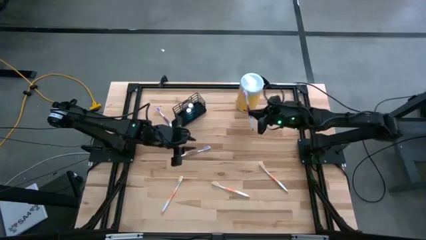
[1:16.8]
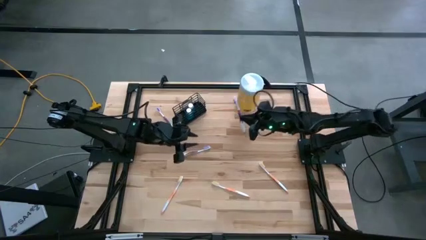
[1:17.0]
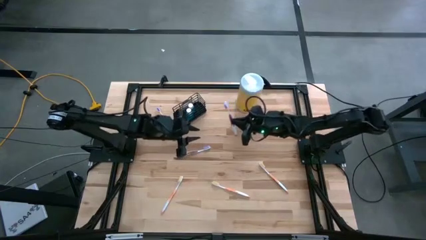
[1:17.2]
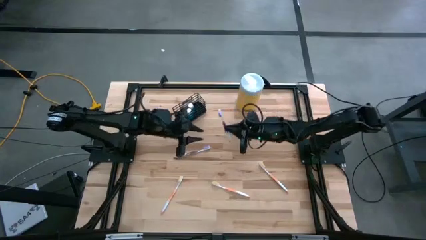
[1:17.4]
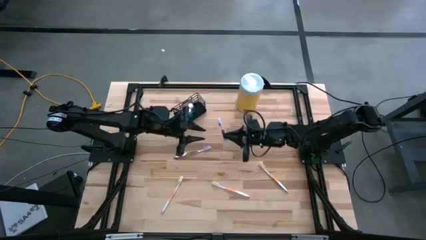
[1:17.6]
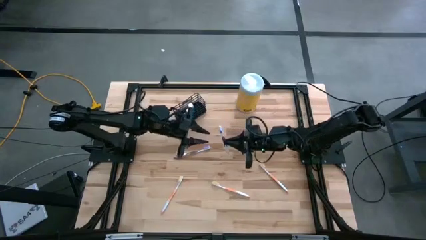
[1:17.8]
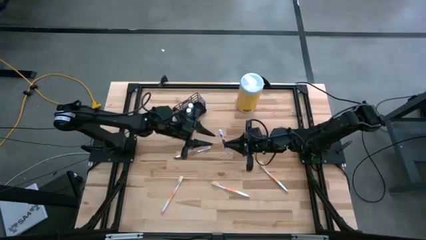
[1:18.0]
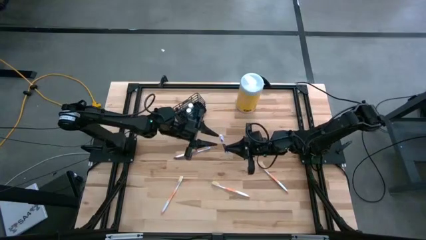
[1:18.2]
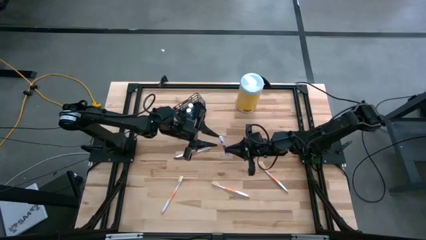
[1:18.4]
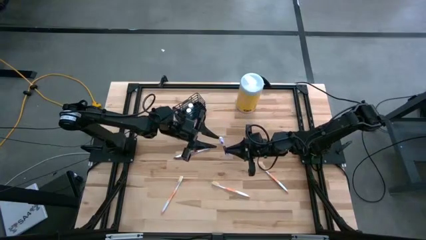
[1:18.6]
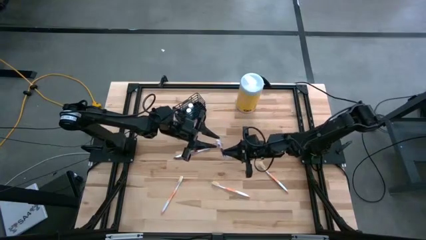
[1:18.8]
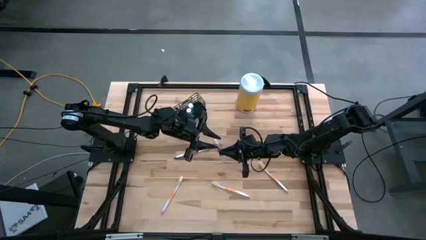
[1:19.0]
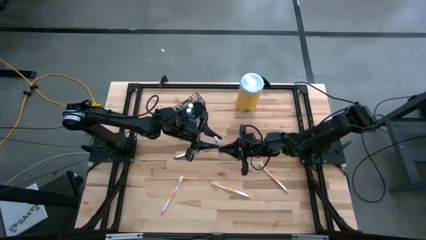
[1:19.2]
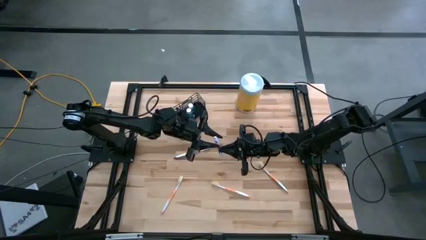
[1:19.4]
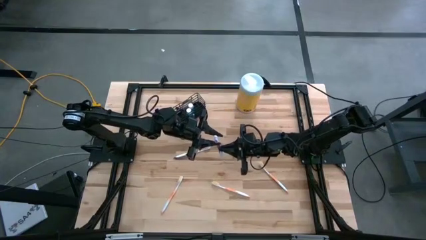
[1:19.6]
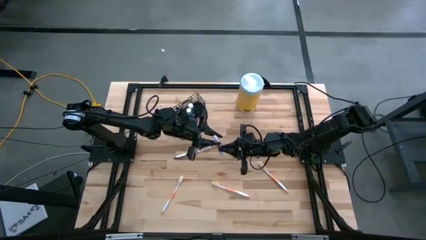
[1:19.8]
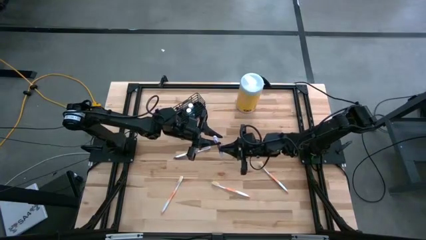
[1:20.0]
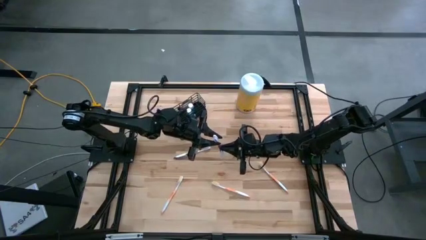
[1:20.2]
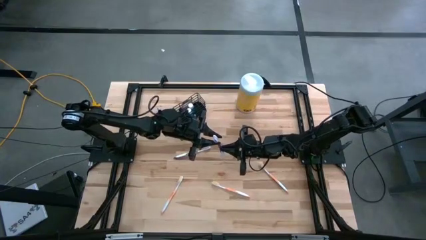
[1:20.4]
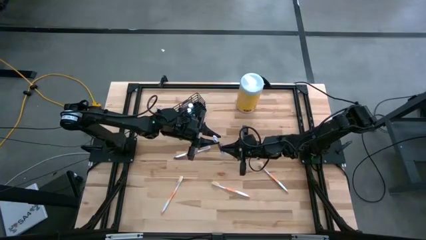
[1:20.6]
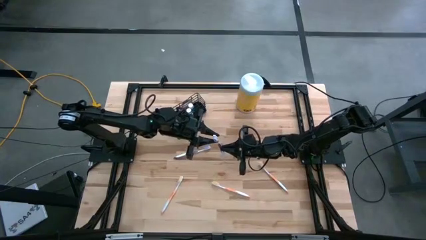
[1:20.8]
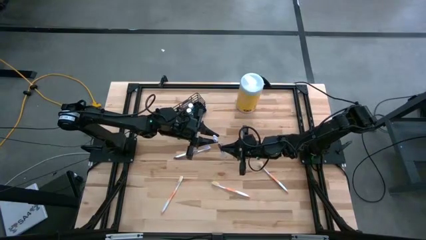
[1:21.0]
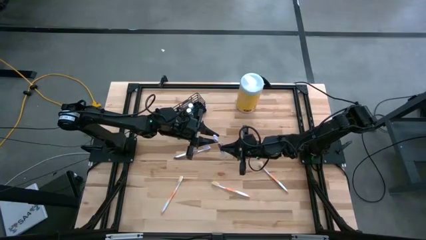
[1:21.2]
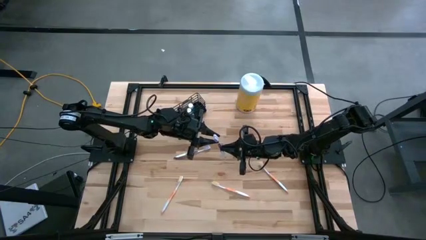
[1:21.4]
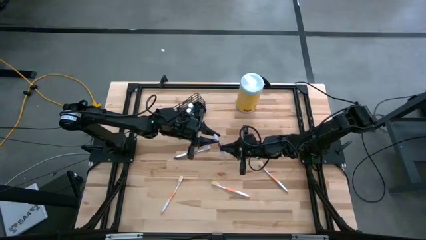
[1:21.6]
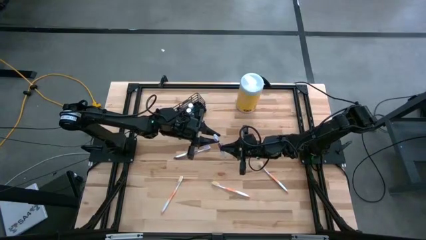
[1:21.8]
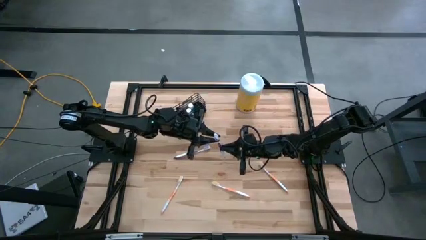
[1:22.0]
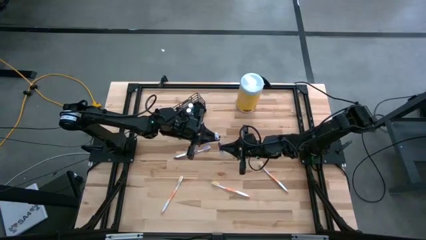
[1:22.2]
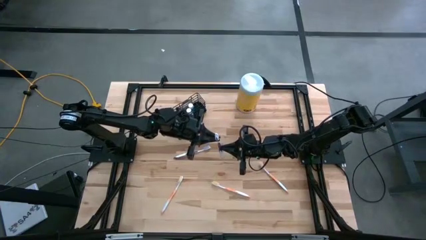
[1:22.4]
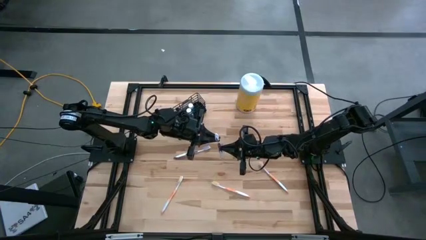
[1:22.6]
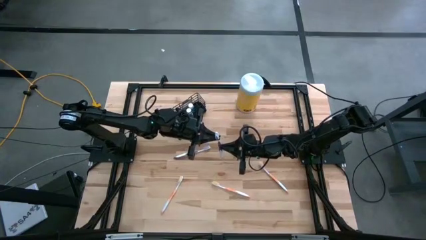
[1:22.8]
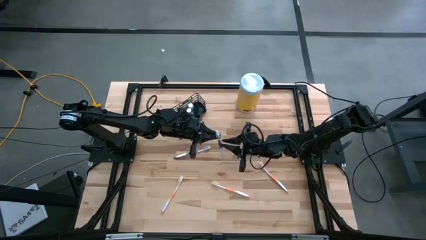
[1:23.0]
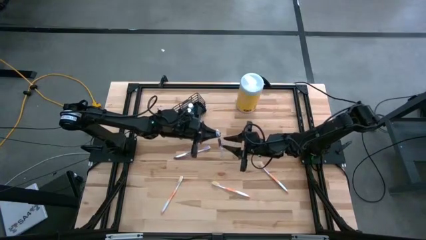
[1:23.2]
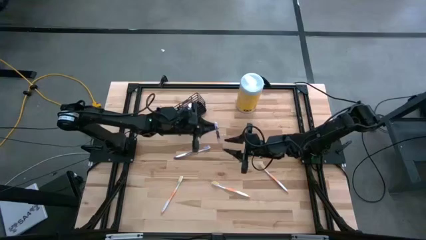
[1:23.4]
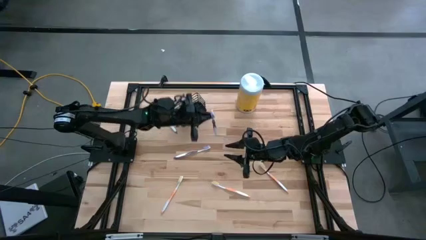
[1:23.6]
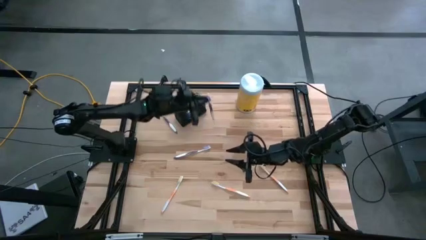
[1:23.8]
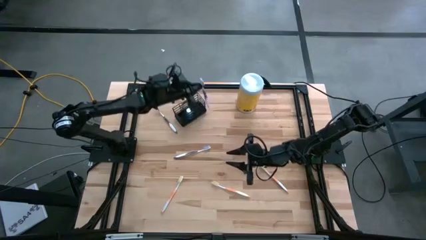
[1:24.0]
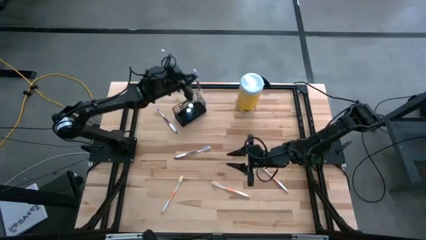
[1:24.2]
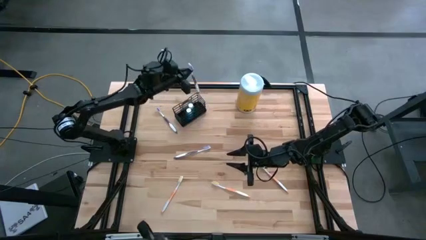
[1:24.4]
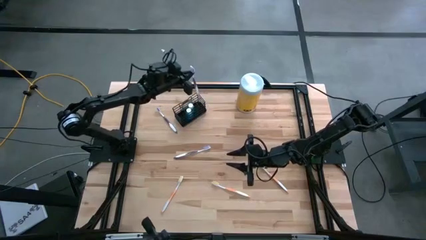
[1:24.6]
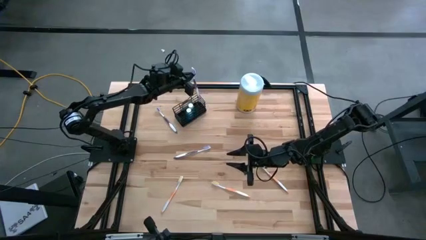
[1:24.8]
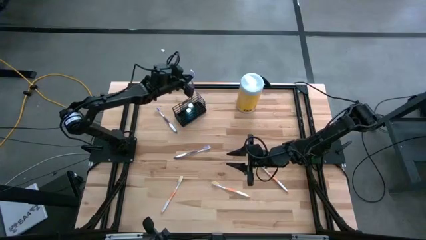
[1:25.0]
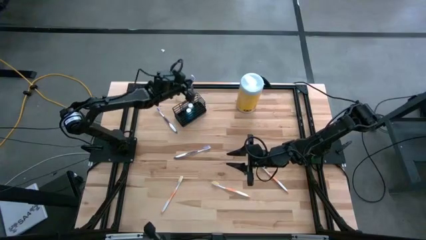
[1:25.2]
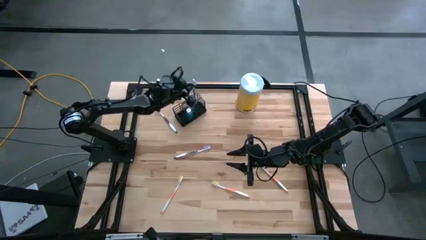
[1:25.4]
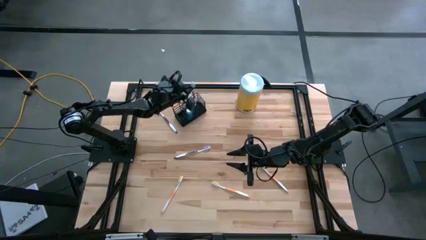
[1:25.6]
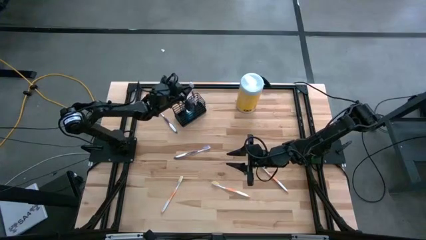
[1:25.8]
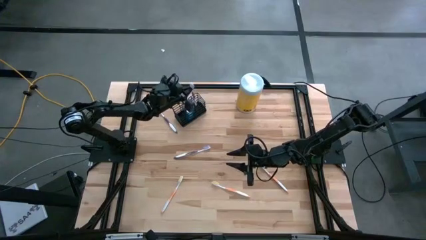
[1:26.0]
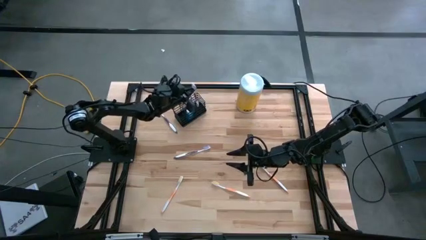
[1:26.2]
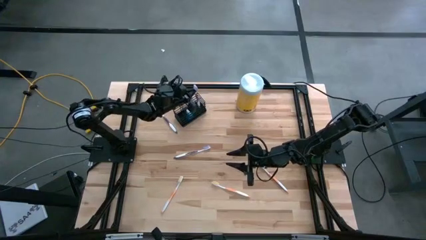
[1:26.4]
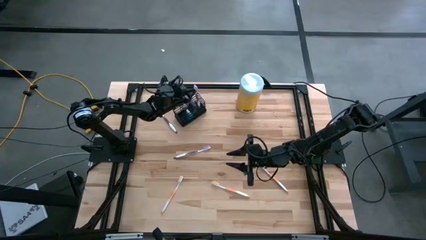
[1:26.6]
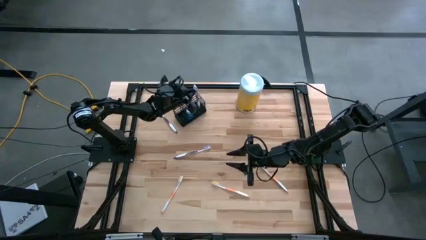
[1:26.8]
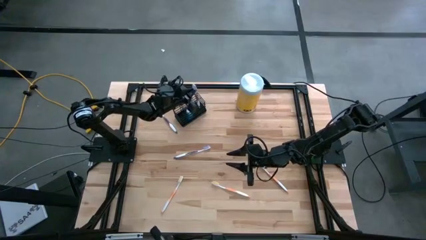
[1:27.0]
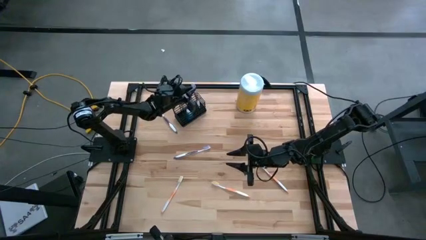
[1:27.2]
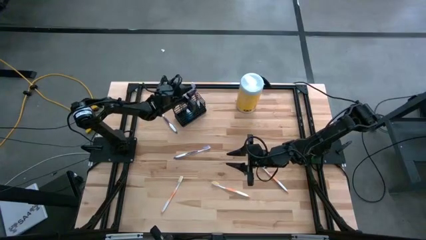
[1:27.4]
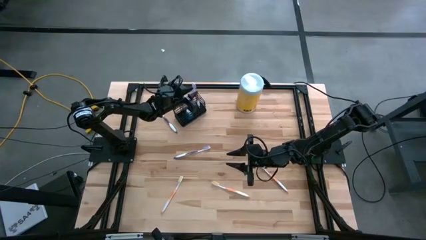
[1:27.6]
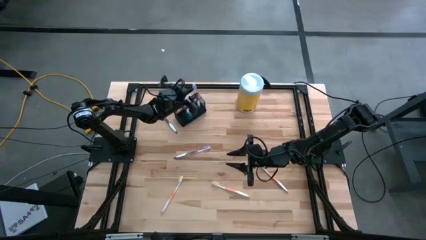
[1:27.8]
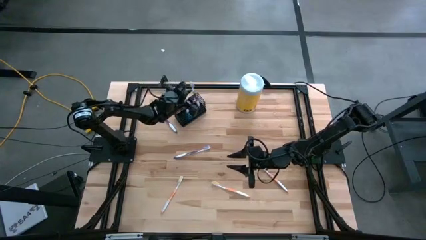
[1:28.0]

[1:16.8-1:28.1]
Task: Pick & Place toothbrushing station
Put the top right purple toothbrush into the right section of the wire organizer

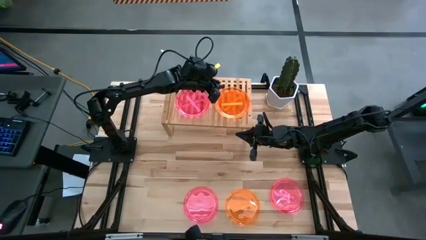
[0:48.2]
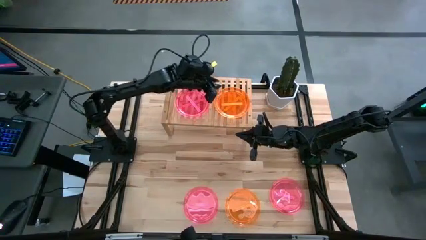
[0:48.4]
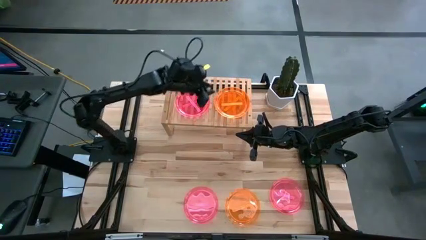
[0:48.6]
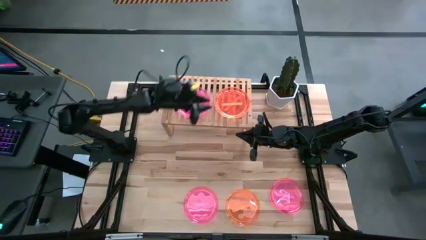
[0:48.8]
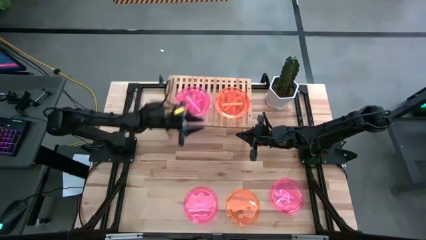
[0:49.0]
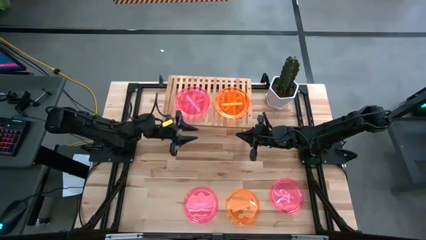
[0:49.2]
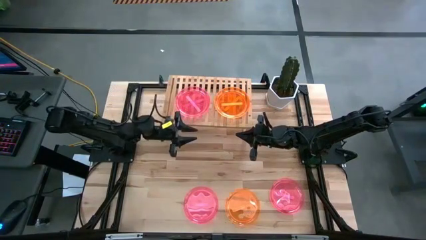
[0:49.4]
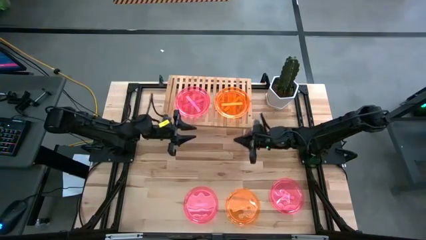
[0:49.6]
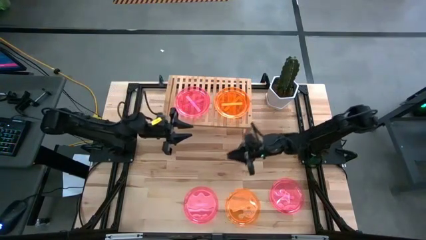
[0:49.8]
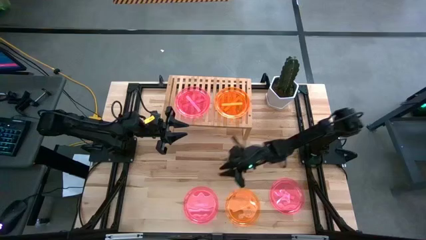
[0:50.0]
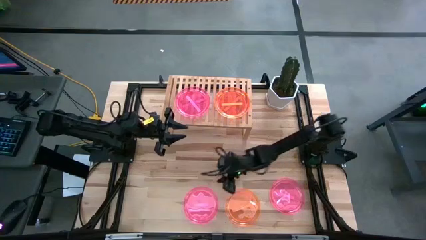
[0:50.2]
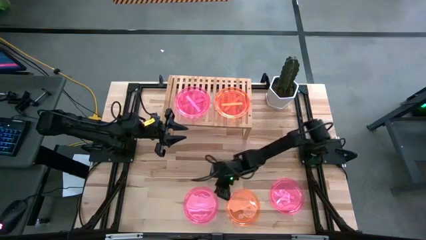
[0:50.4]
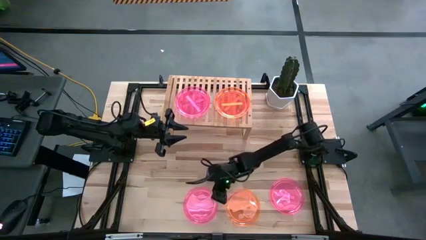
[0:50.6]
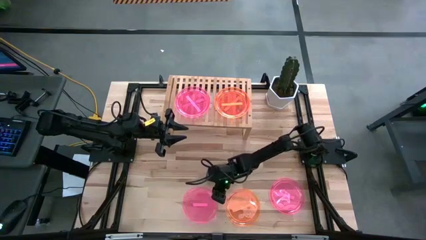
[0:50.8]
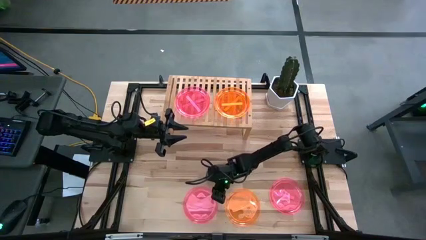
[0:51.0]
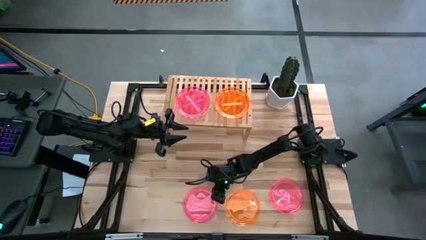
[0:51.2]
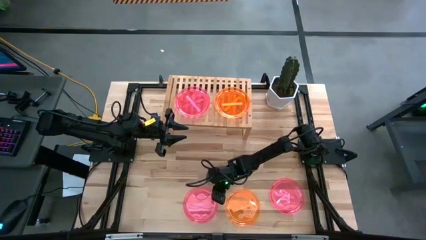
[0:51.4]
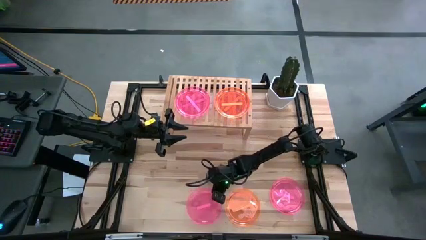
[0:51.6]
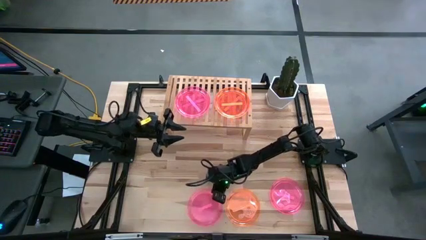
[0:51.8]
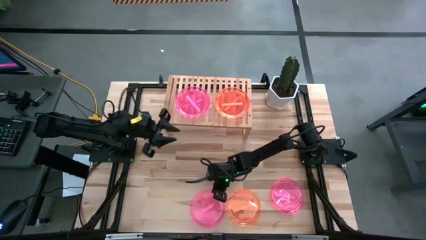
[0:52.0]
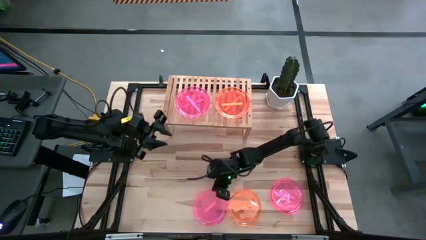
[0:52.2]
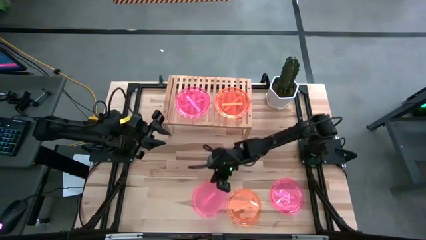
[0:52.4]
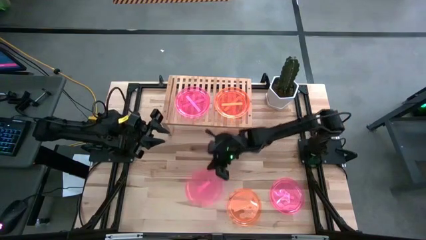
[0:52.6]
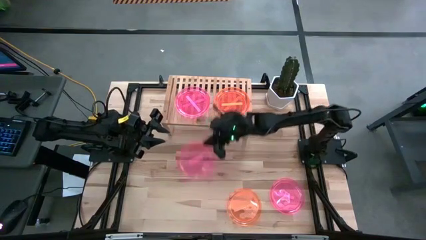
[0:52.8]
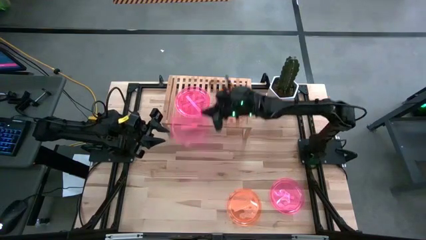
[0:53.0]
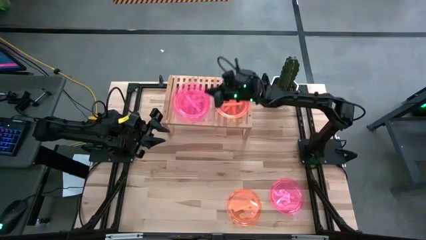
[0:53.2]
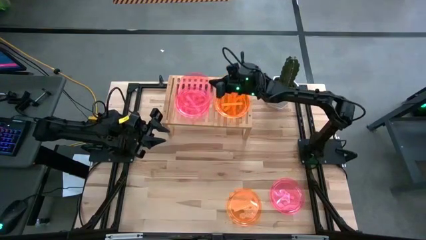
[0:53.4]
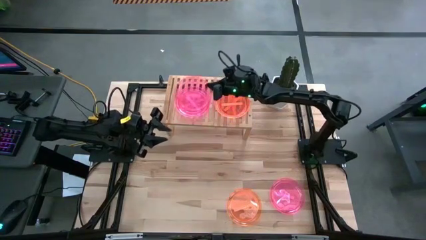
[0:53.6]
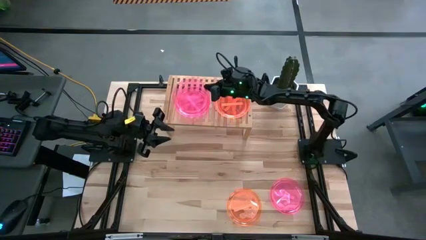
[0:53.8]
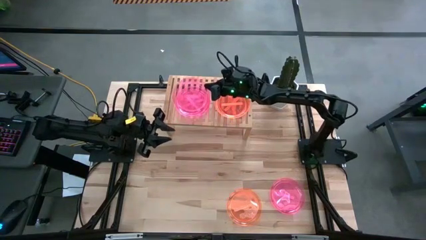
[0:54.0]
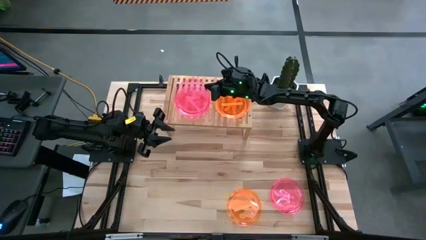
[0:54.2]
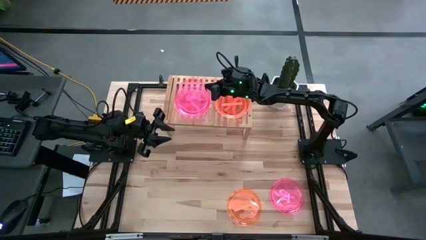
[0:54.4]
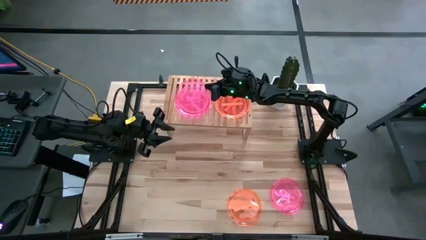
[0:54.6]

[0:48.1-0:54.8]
Task: Place and stack plates onto a shelf
Stack the pink plate on top of the other pink plate on the shelf
